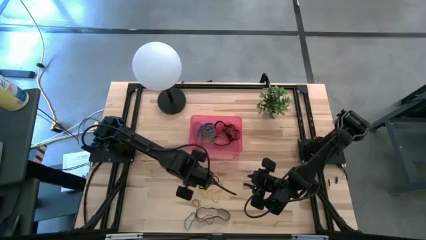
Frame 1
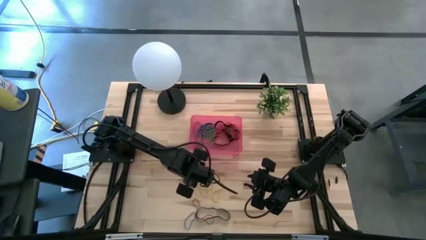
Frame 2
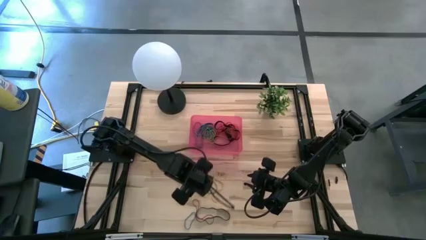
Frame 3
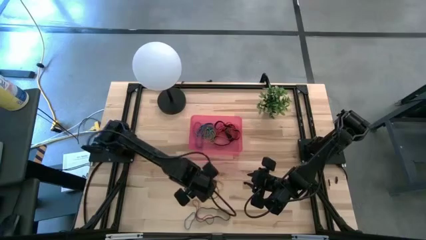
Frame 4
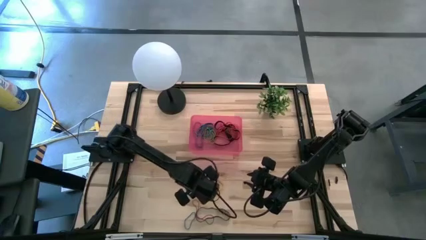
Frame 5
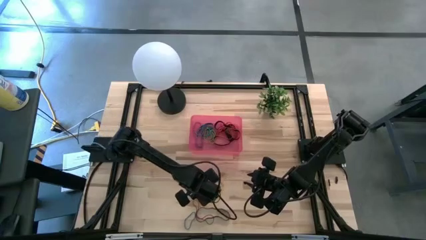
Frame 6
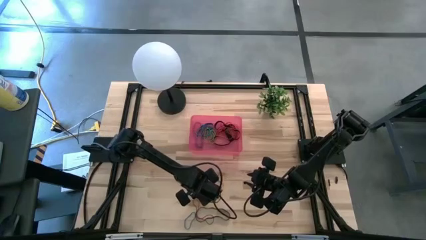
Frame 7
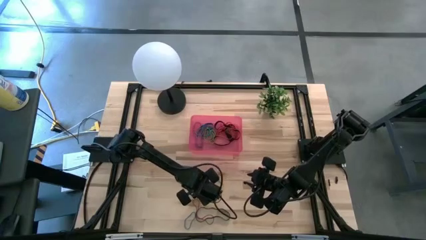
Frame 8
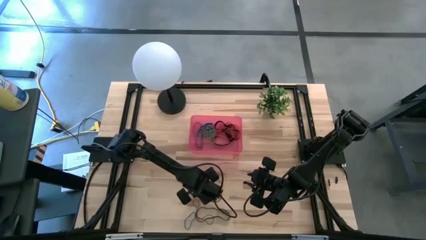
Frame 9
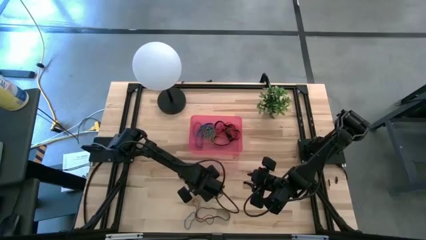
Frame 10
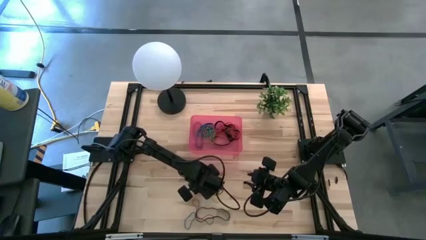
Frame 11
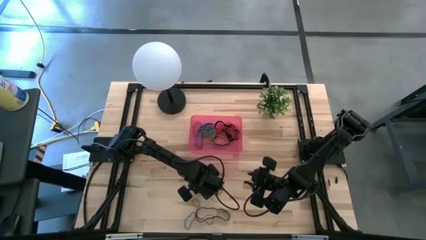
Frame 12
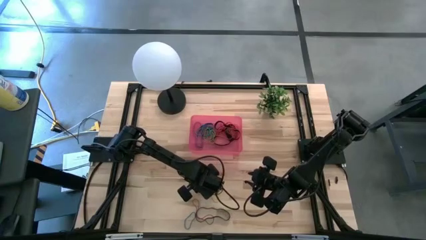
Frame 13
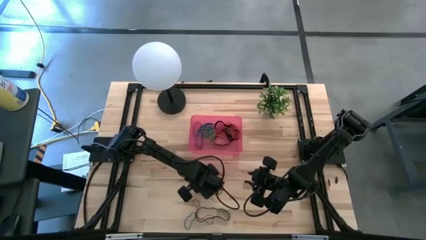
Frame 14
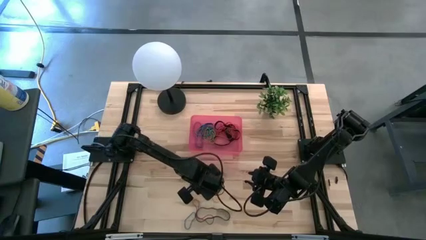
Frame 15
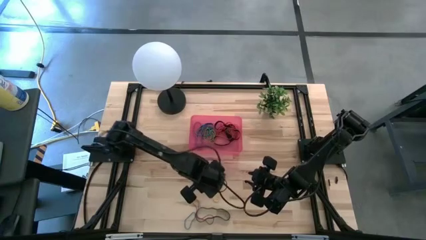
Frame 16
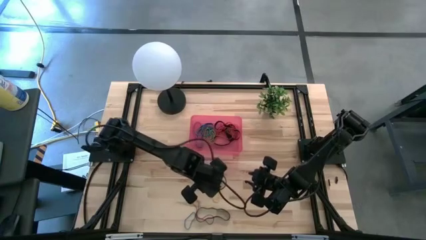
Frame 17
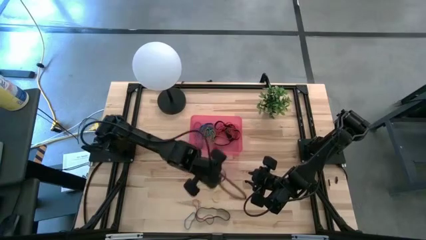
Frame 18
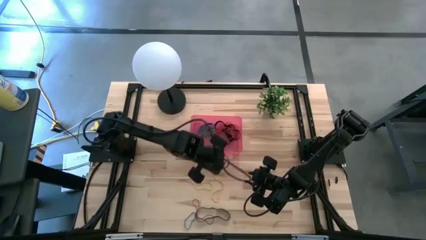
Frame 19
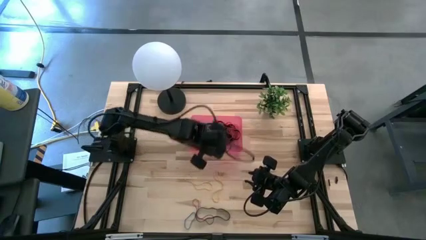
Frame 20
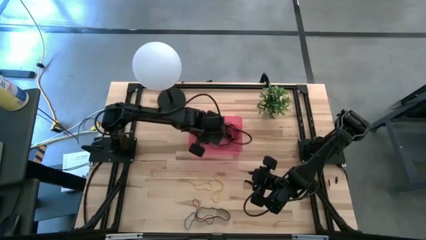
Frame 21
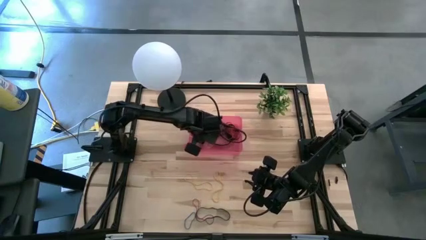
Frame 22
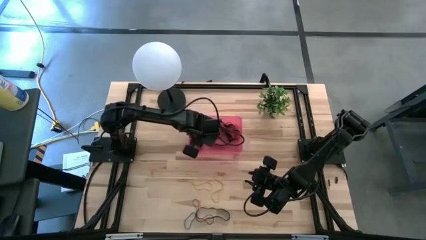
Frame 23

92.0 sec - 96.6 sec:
Task: Pick and place rubber bands into bin
Put the yellow rubber band into the red bin

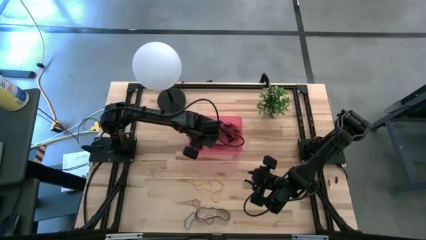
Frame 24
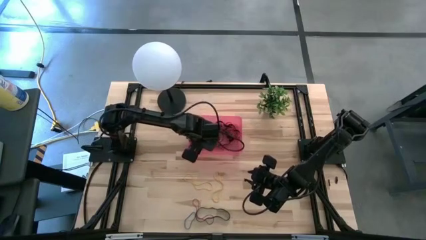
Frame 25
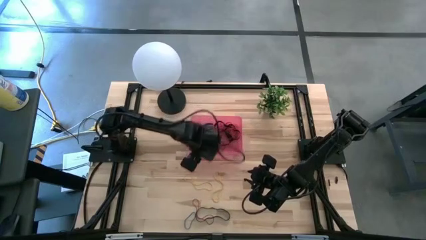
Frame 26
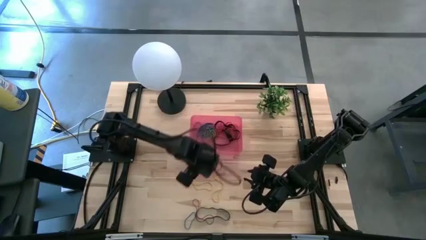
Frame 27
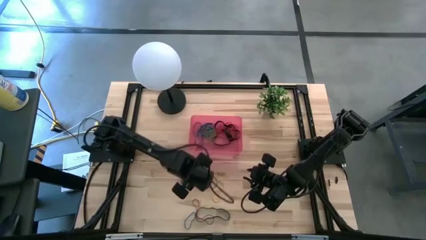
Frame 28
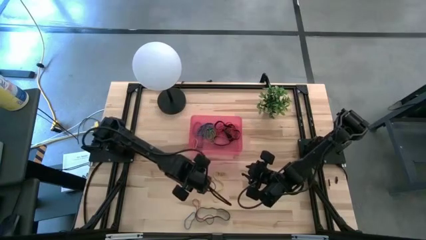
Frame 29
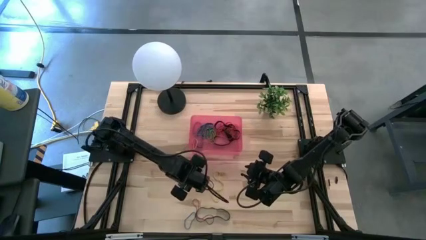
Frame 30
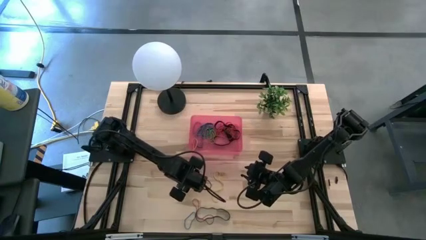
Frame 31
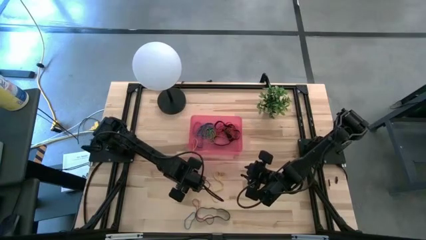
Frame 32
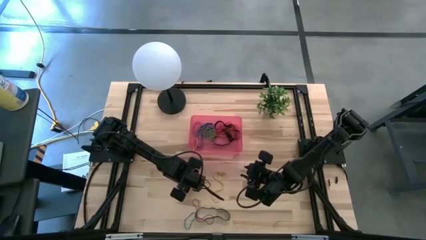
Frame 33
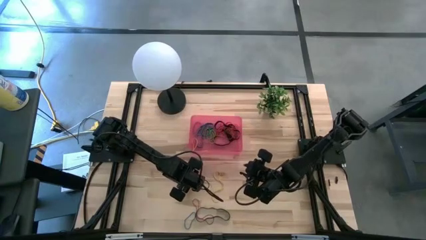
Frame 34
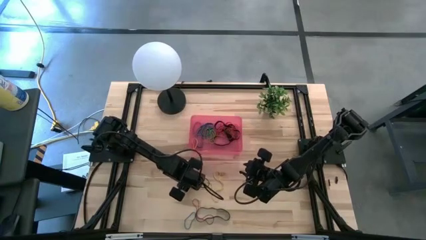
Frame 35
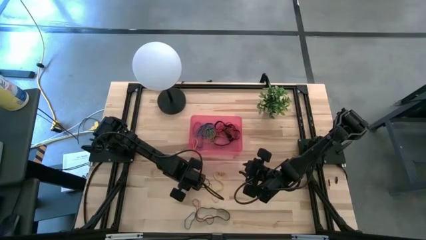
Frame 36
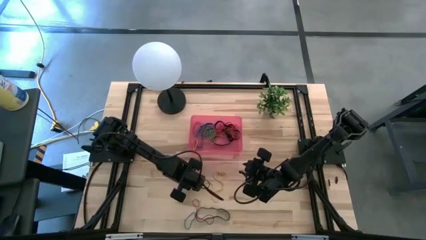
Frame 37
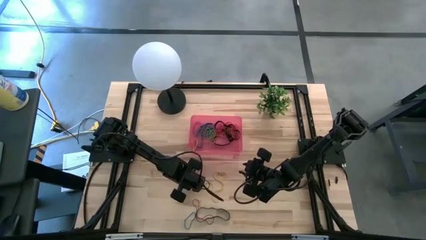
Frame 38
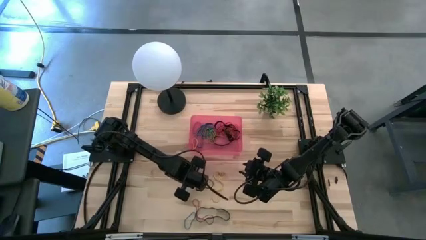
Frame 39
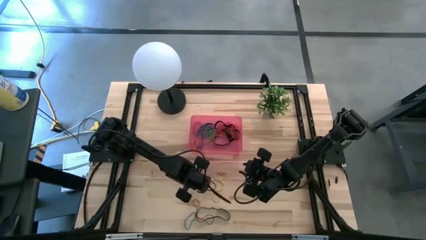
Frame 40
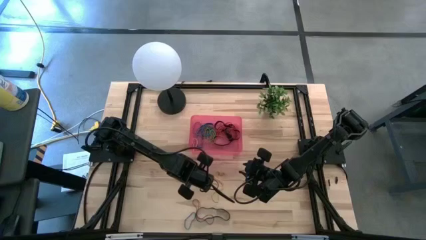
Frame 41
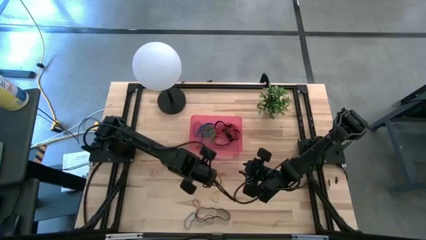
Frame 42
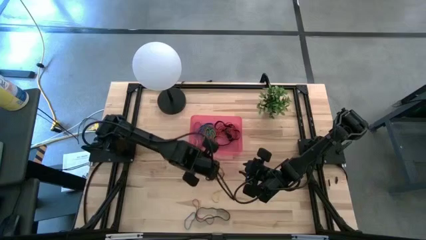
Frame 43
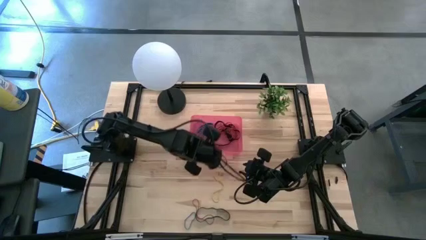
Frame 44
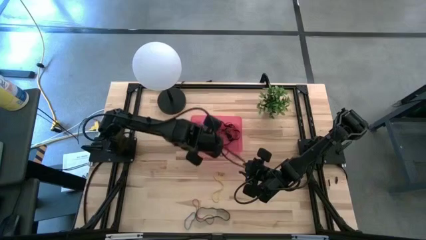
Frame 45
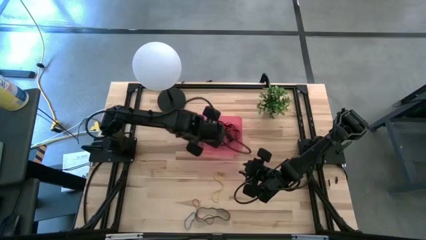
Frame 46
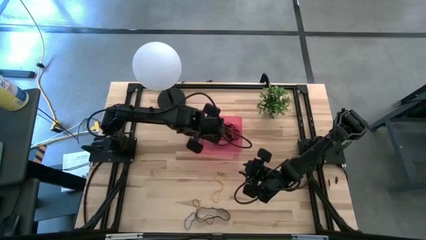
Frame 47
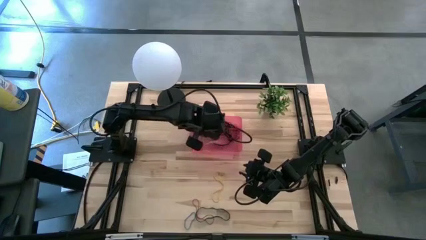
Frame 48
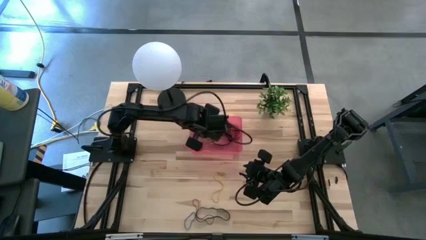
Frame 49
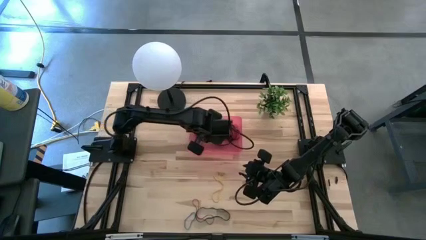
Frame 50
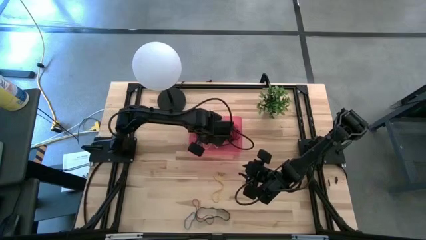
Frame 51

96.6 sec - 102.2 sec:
Put the yellow rubber band into the red bin

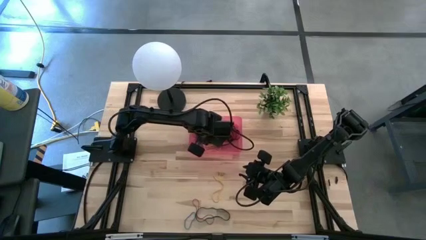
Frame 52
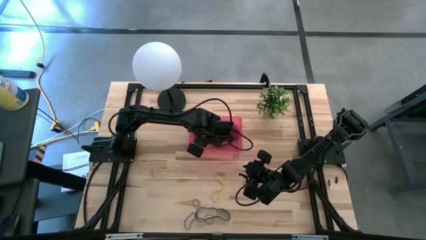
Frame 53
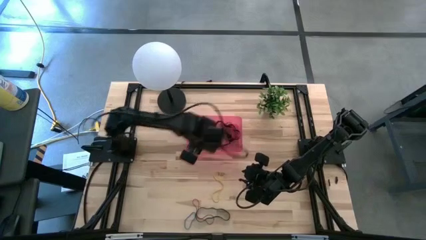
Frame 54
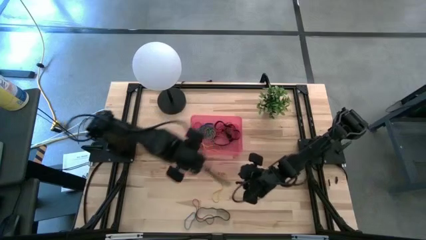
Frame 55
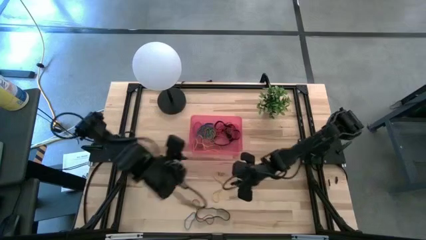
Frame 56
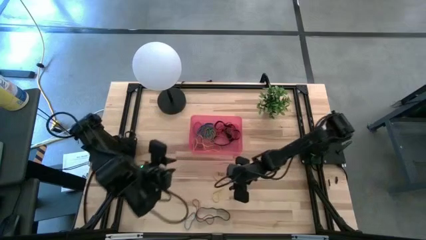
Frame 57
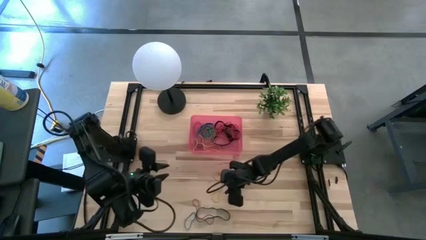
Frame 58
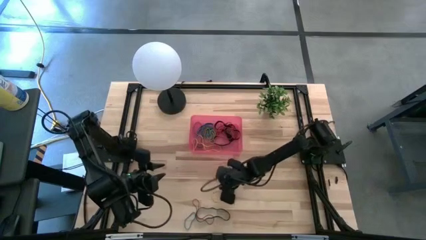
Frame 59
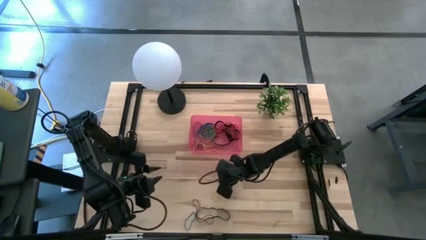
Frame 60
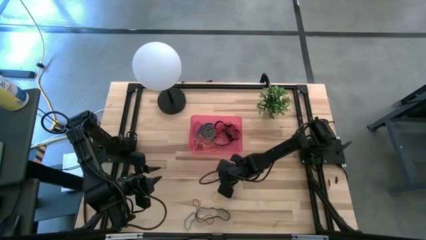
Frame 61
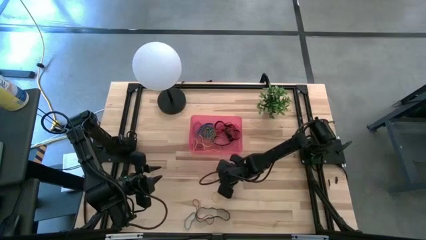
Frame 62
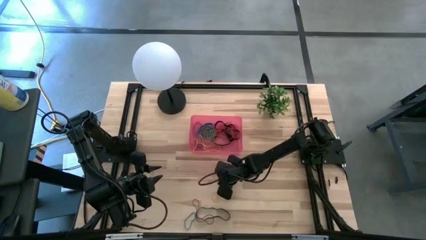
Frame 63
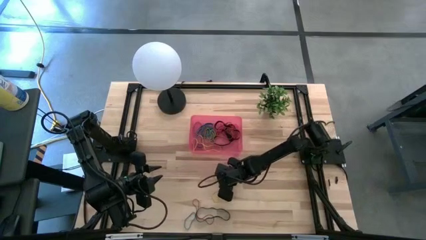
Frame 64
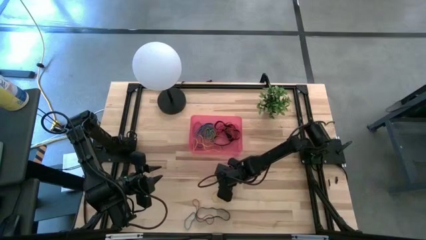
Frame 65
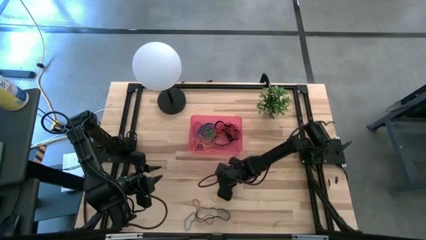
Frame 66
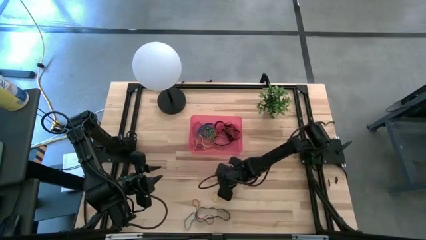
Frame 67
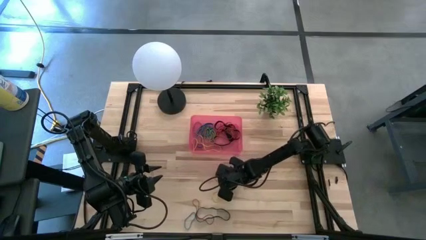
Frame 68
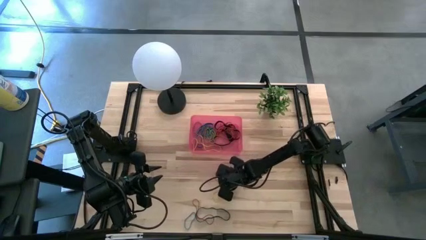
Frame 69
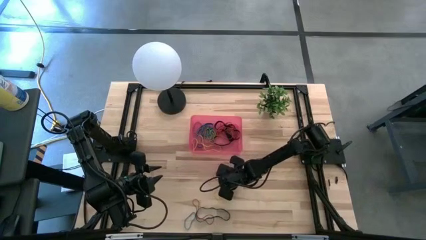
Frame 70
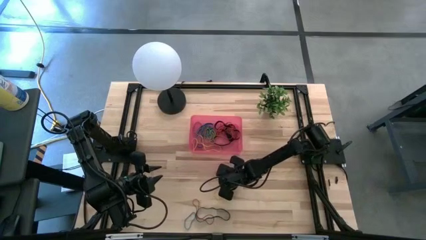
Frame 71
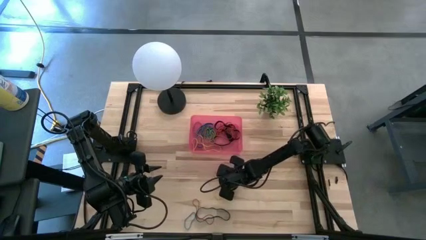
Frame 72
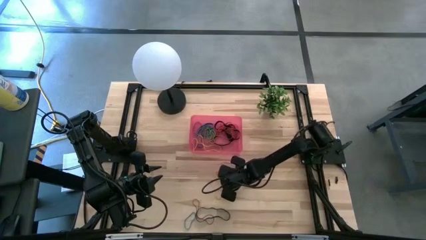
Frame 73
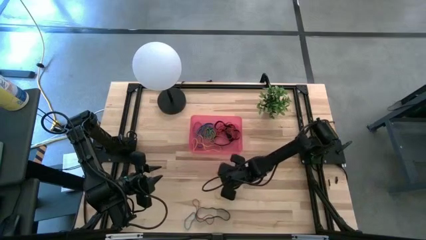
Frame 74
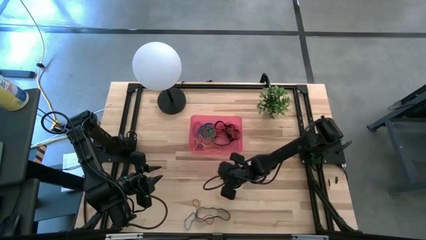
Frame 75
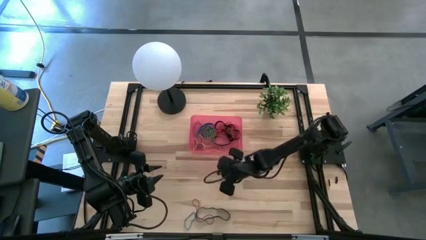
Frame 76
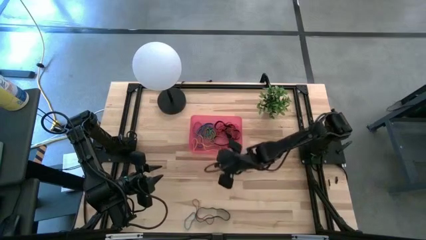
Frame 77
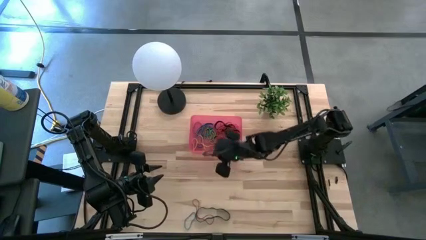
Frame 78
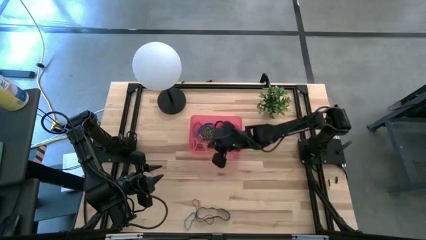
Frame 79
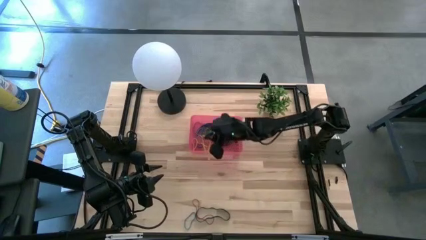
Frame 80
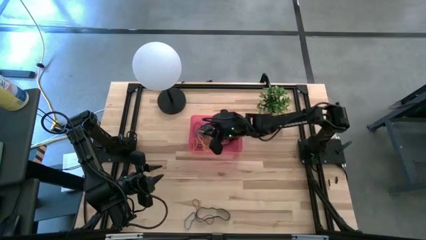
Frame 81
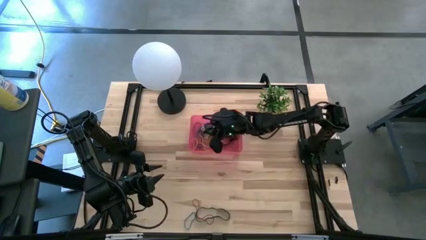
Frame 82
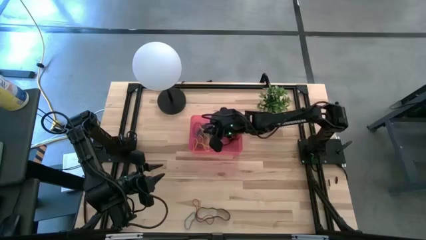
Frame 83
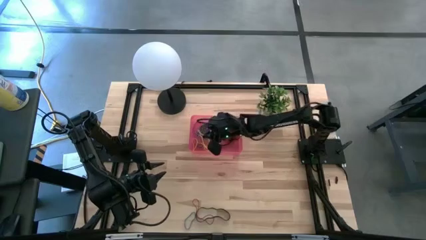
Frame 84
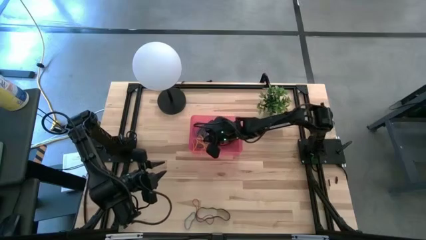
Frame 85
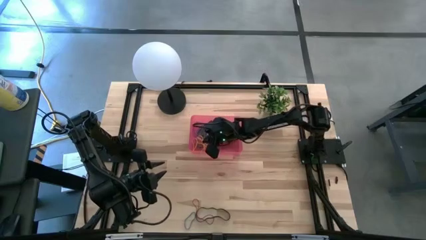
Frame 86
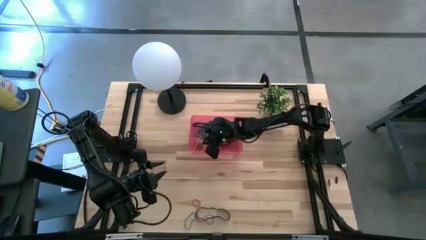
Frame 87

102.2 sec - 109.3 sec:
Put the yellow rubber band into the red bin
